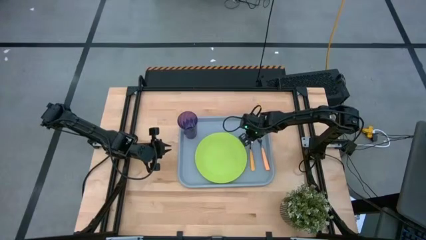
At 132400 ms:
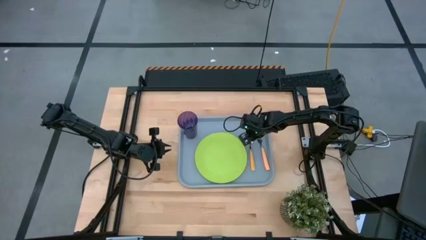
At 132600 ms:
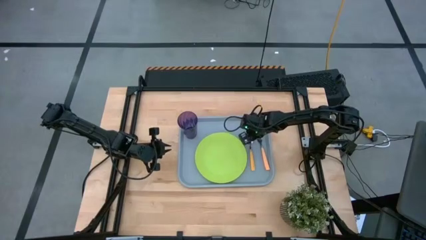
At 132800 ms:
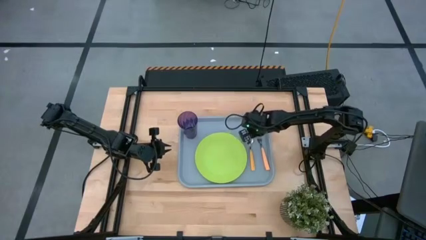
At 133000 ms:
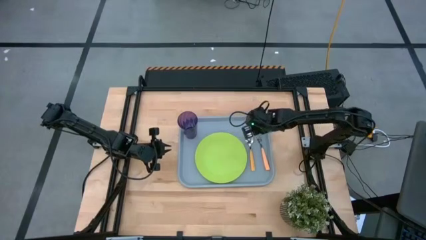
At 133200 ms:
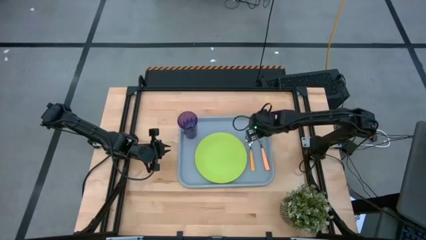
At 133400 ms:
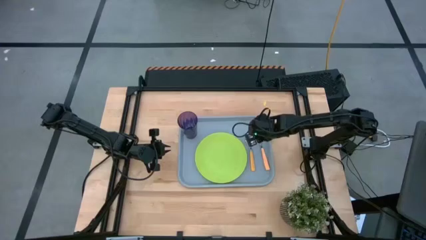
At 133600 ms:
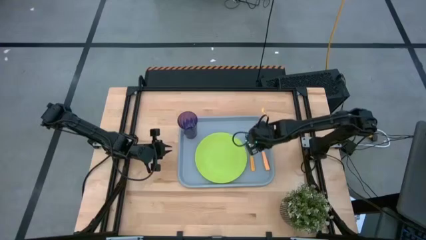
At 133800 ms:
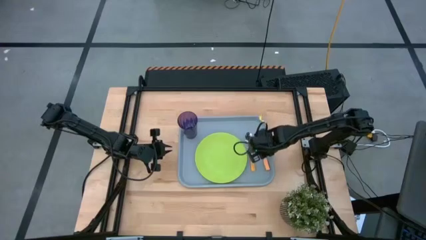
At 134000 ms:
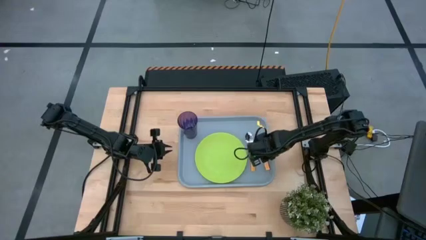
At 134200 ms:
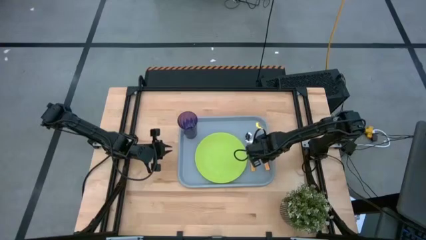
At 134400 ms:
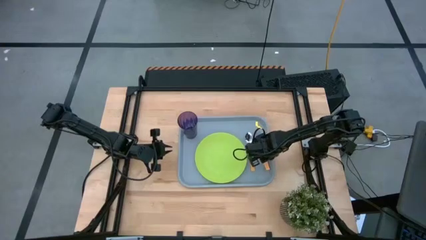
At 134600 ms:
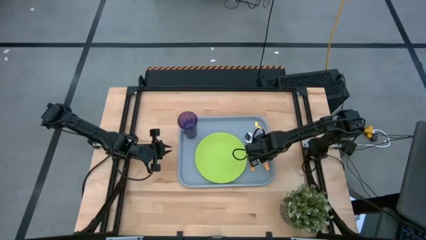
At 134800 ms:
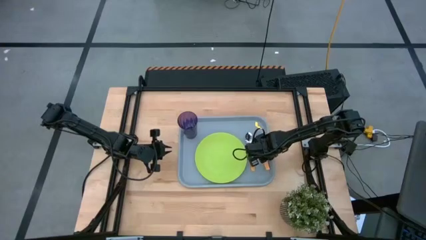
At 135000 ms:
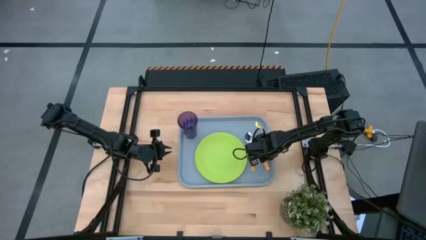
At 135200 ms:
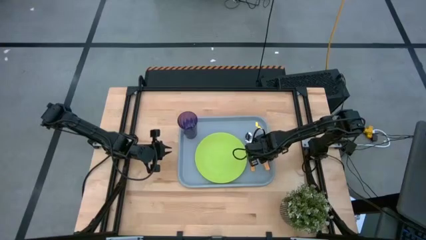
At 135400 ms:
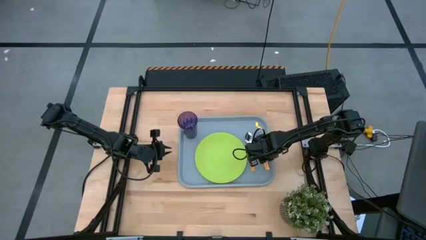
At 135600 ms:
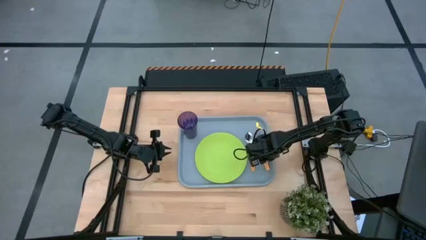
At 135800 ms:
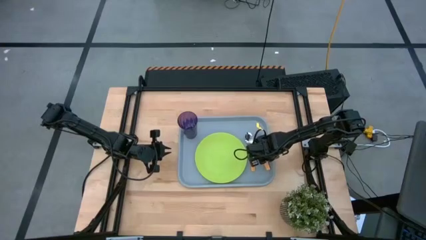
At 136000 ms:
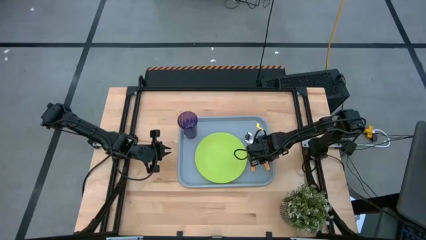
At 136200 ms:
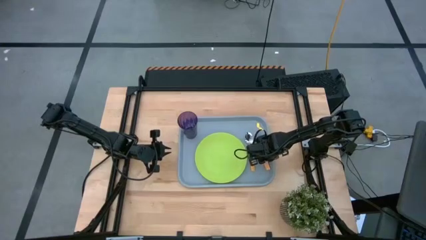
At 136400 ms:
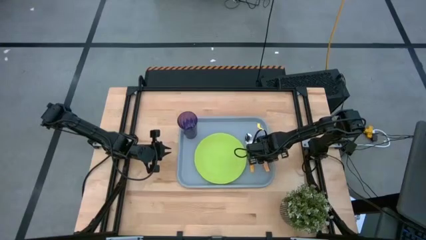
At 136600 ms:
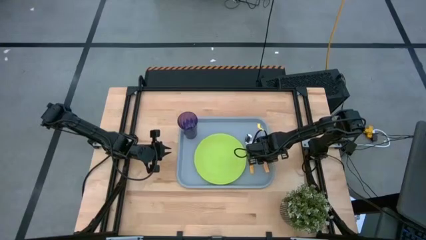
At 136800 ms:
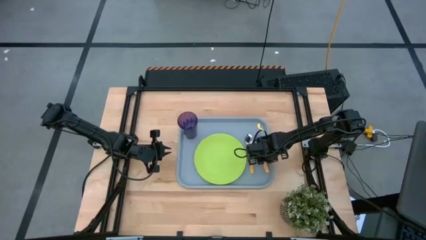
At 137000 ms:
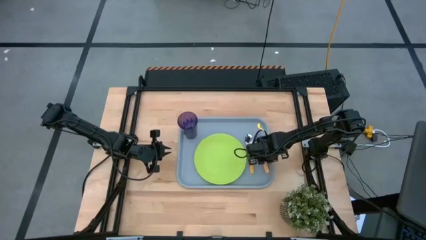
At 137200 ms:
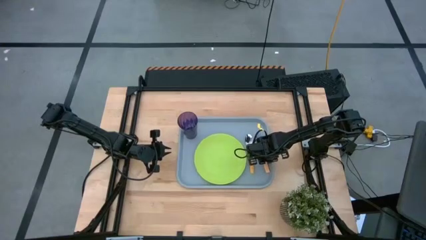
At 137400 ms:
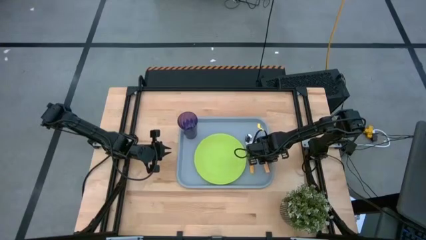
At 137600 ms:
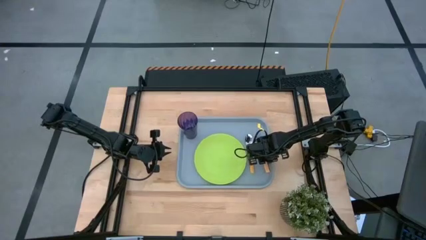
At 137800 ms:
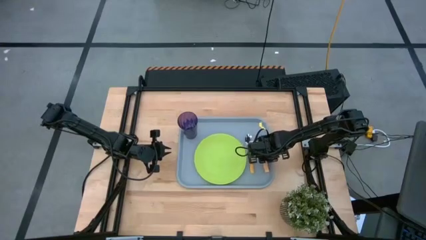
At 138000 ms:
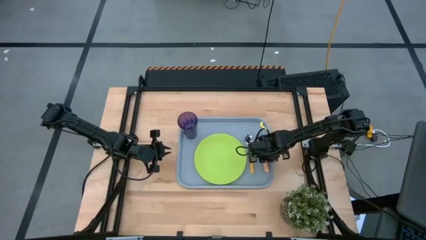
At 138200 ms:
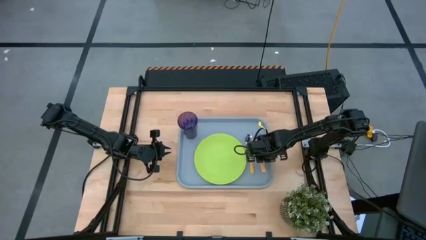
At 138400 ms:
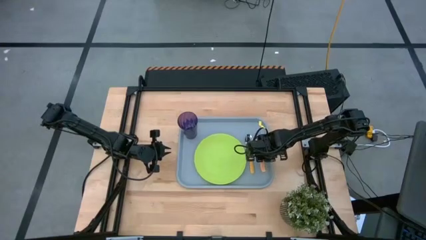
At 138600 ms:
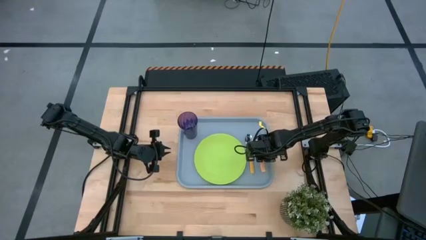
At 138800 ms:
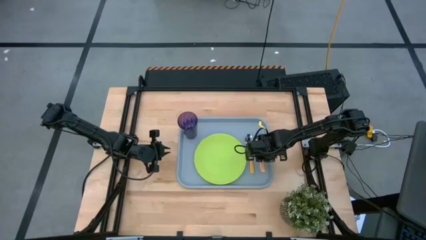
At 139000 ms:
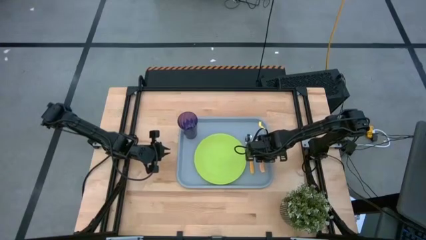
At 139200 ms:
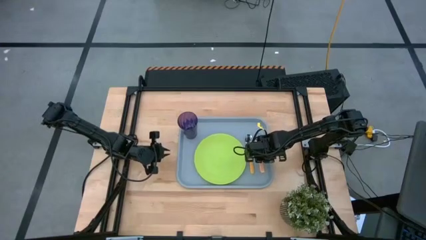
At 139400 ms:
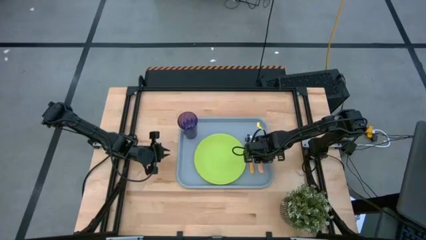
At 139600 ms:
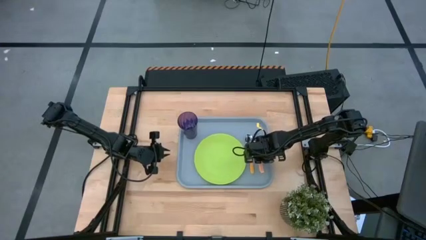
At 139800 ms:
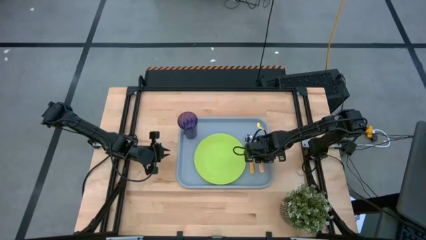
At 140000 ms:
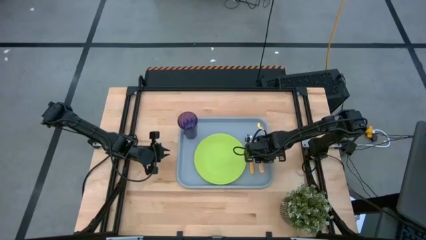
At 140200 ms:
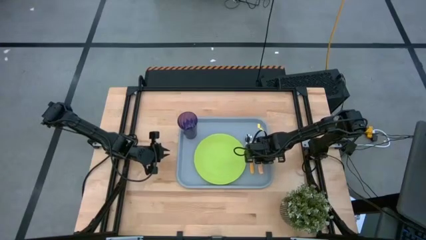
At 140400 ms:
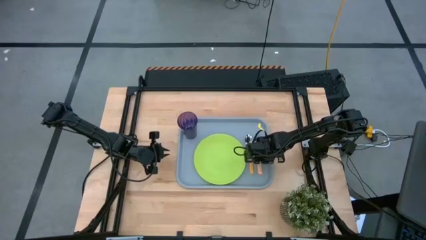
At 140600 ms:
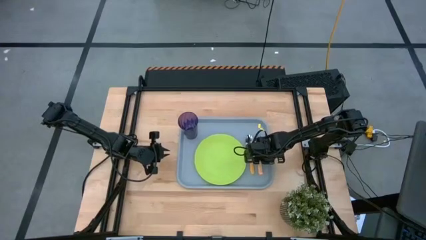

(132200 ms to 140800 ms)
Task: Pick and place plate/cup/fork/spoon on tray
Adjust the light orange fork on the gray serving tray

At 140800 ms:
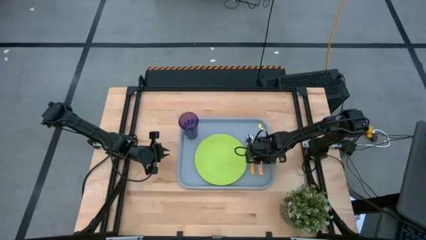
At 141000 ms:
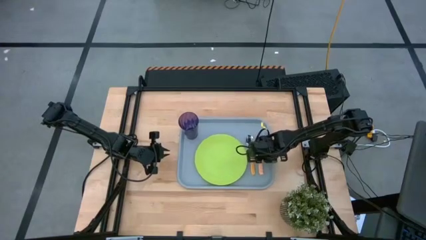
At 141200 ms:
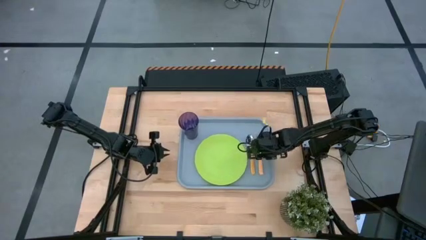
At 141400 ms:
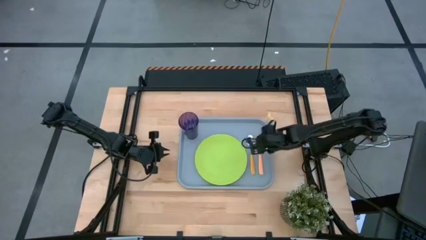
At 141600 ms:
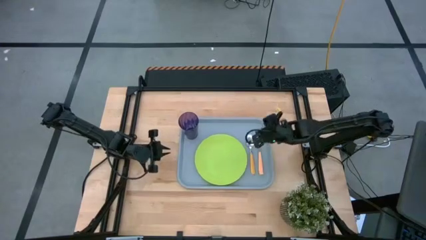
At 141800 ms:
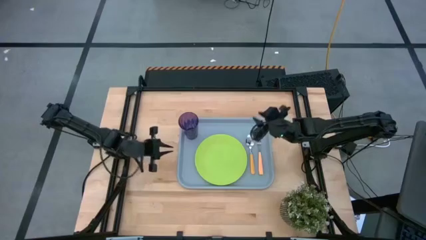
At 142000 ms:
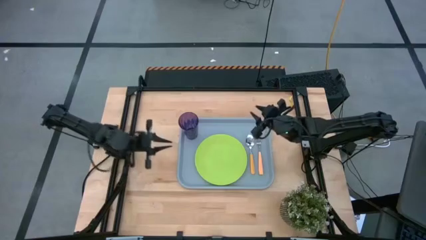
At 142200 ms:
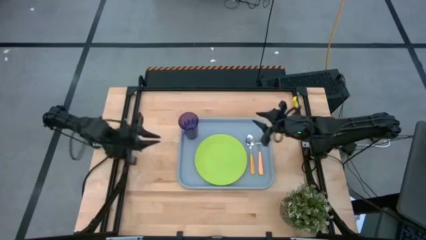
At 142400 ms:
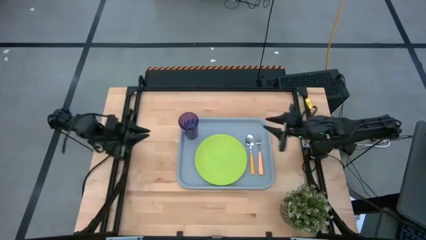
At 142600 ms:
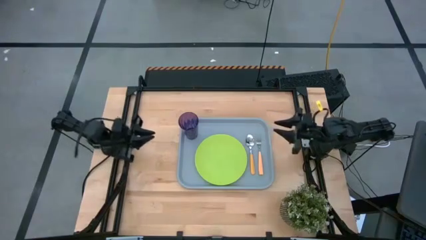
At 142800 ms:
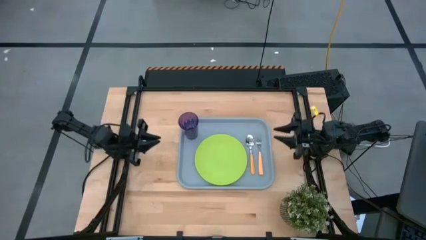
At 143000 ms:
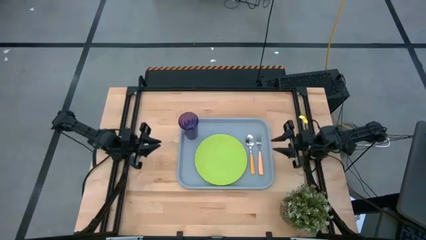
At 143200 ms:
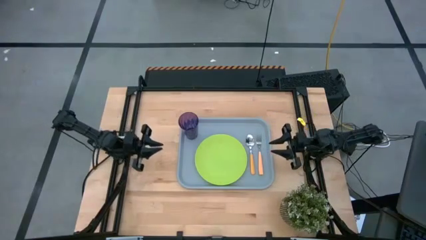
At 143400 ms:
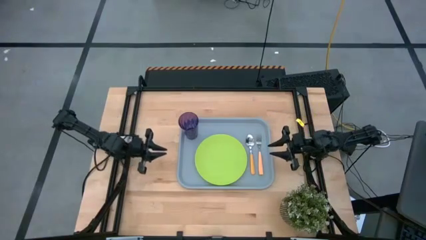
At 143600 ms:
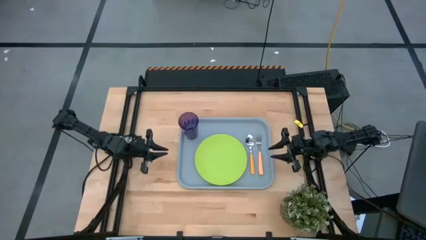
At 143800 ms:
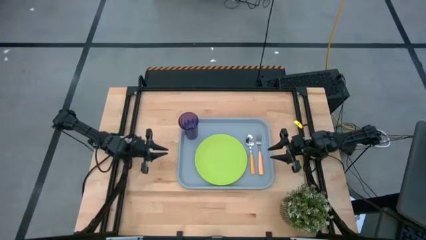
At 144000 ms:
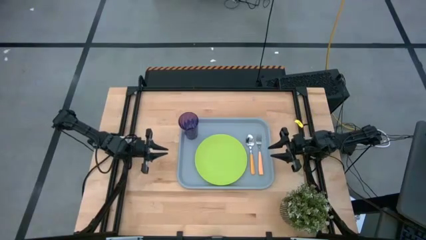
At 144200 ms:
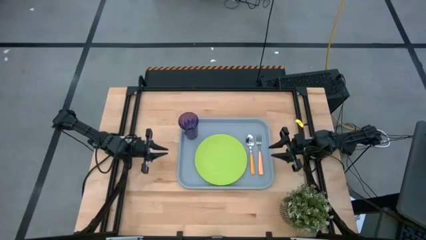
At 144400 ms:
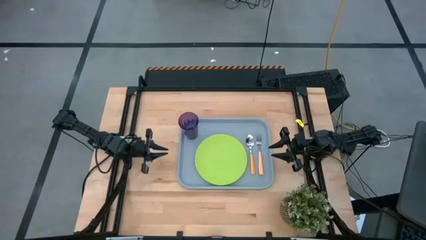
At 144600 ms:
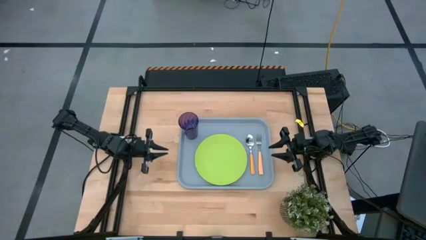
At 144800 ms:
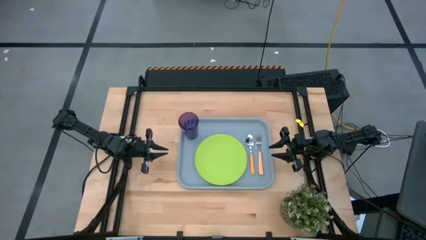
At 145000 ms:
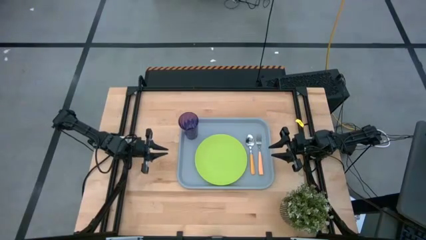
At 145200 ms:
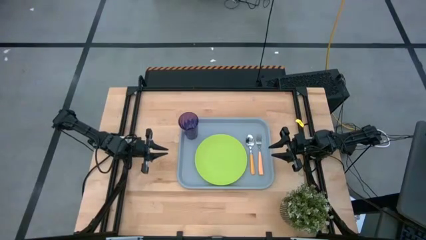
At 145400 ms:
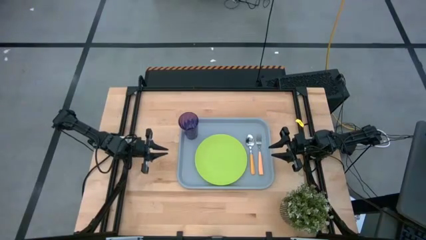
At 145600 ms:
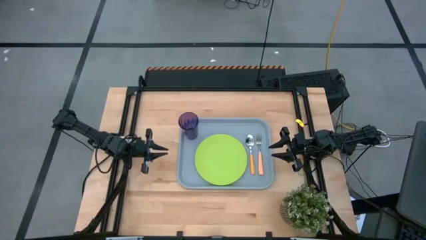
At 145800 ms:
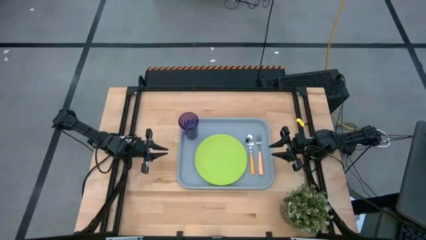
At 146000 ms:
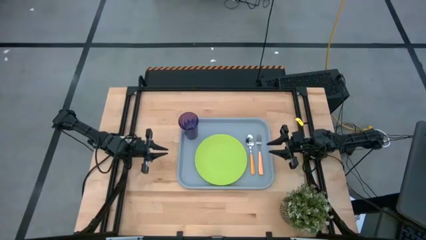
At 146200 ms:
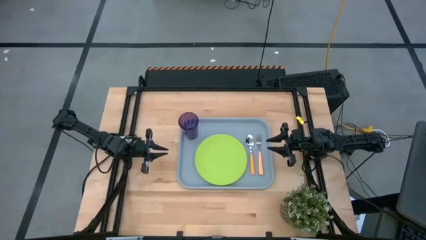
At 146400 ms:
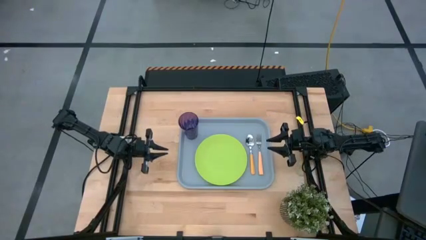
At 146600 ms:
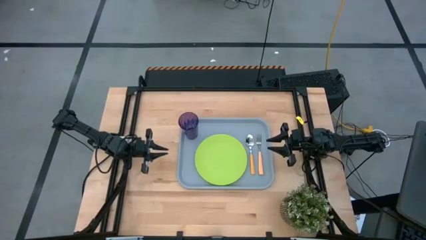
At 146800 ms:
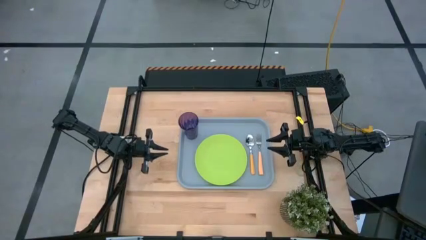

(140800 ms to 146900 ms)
Return to Home Position
